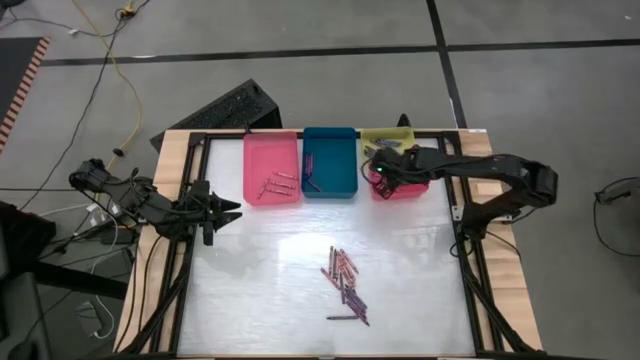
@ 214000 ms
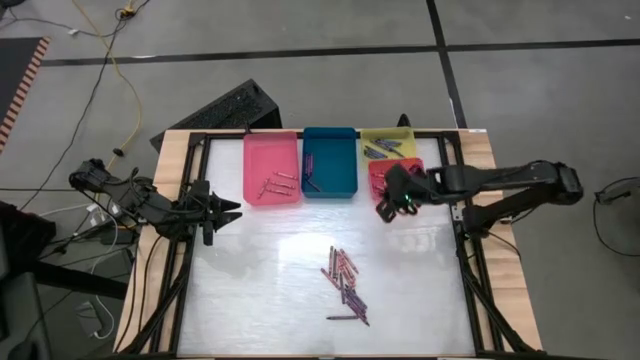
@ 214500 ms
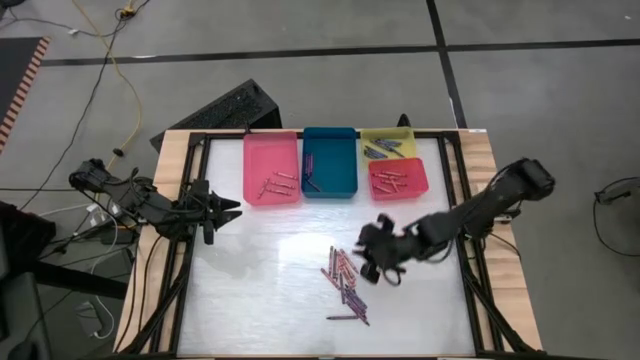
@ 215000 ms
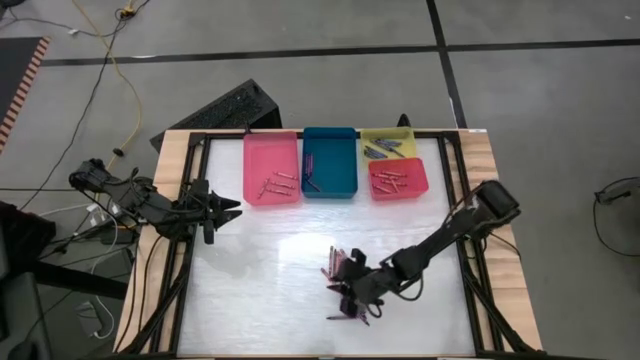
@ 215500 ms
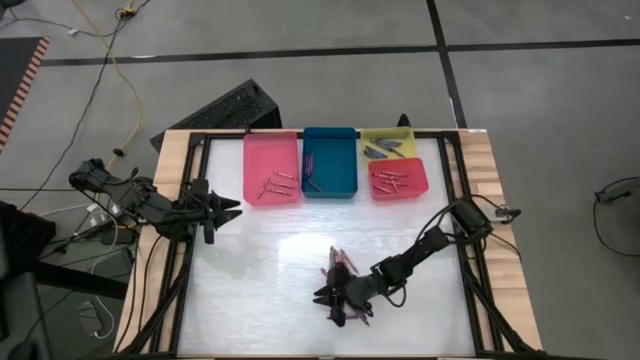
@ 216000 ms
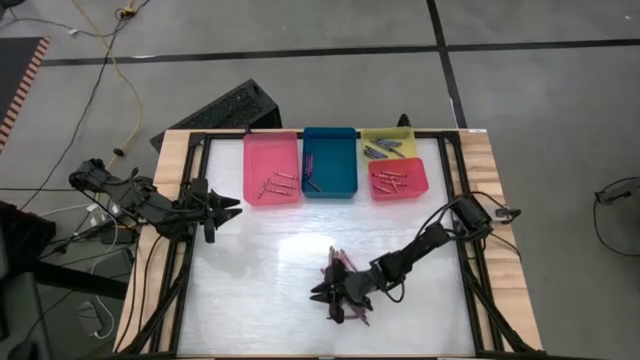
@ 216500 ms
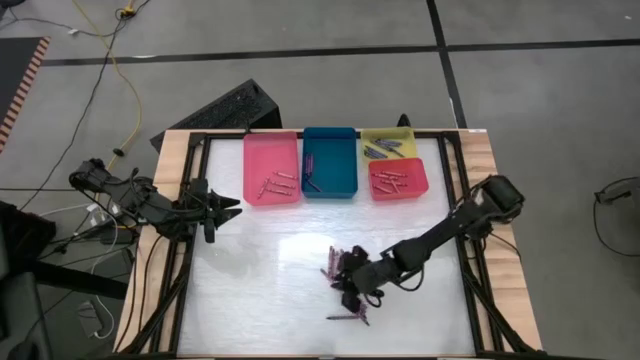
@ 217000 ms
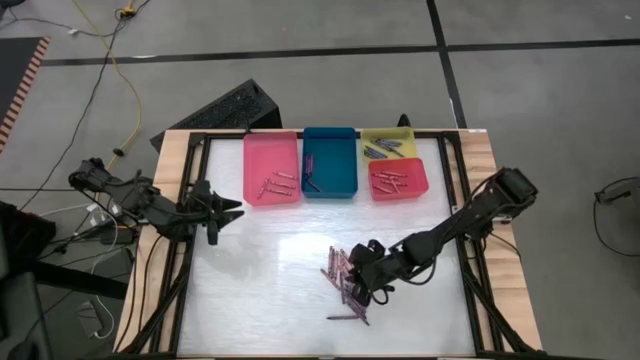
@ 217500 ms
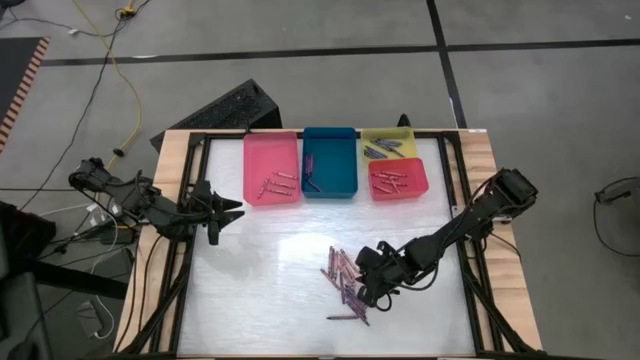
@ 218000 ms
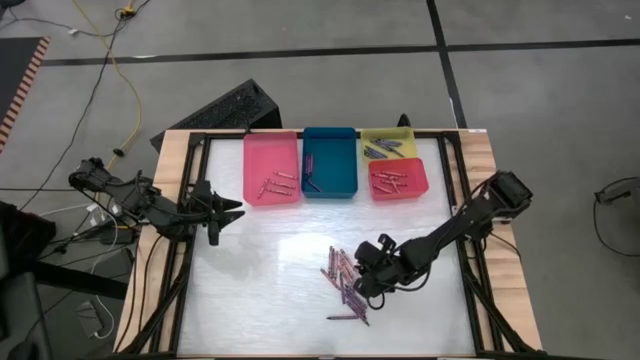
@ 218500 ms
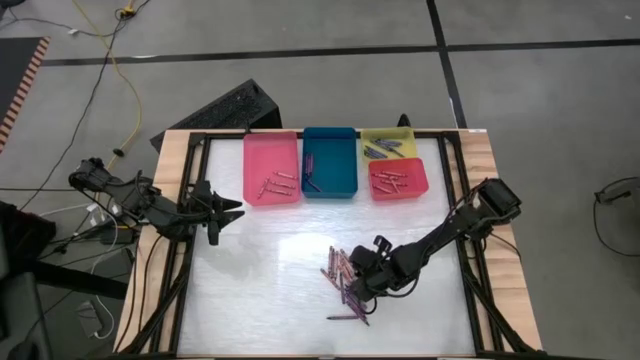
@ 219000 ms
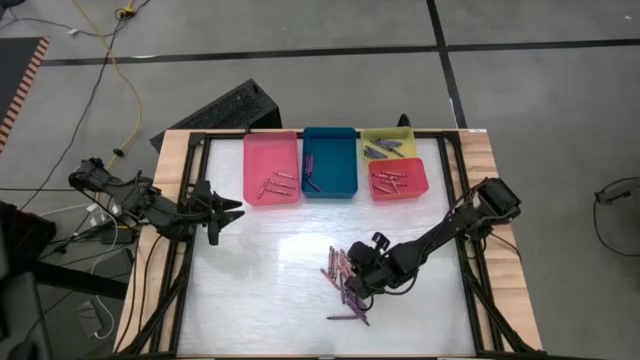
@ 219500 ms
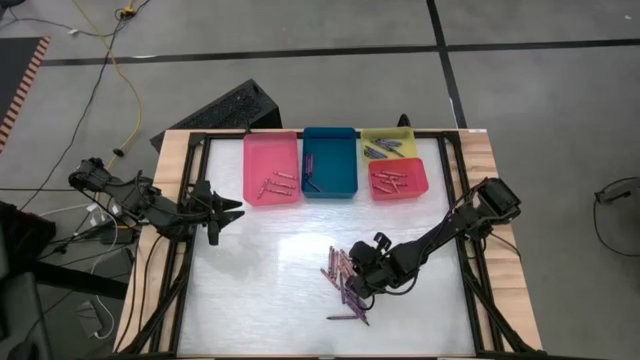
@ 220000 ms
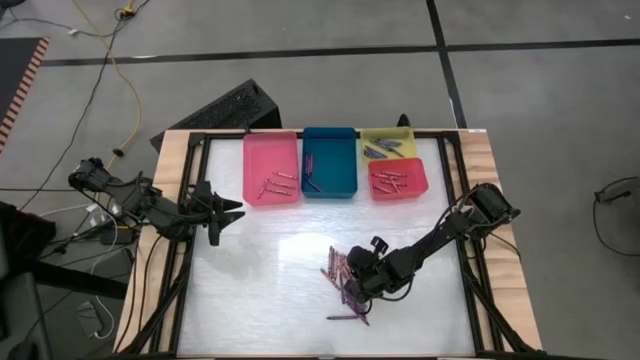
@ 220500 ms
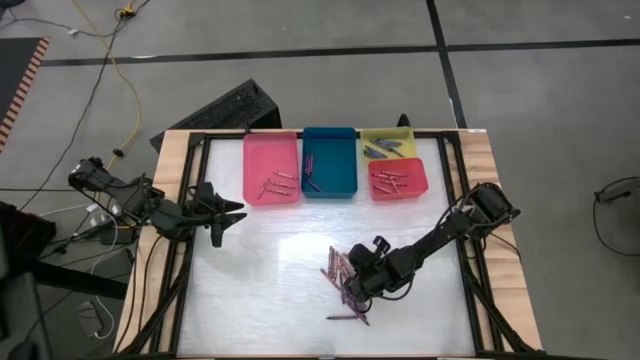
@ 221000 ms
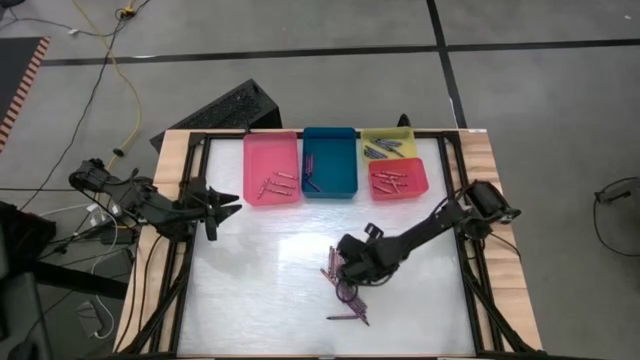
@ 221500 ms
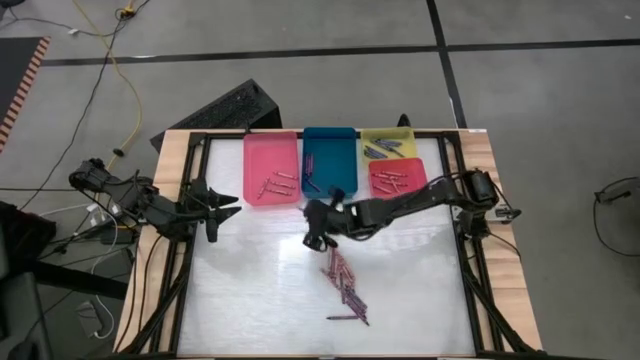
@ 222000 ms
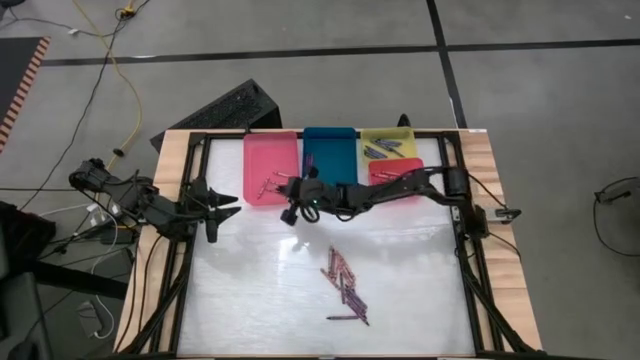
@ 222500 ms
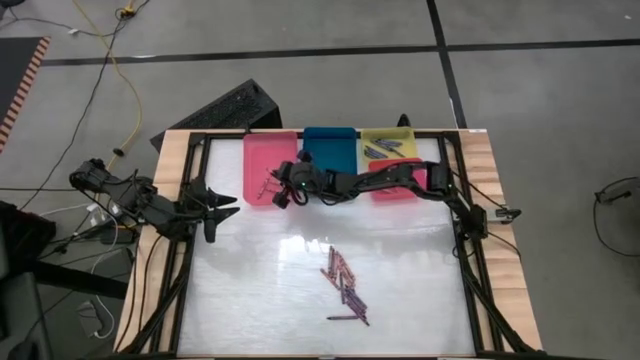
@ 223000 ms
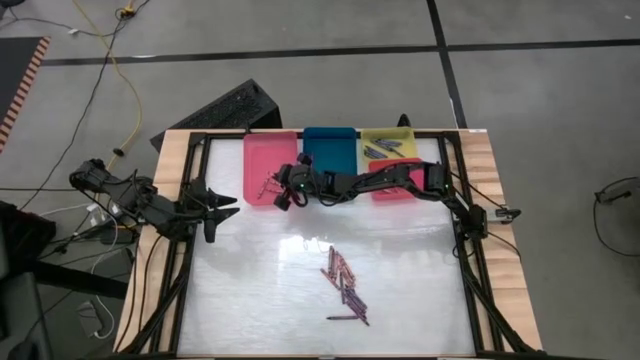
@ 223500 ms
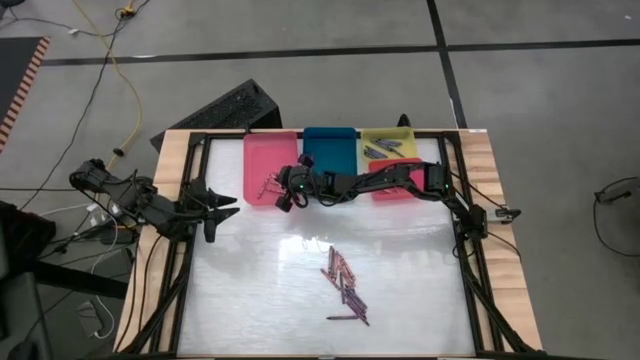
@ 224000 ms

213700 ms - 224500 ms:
Task: Sort crayons
Put the pink crayon into the pink bin

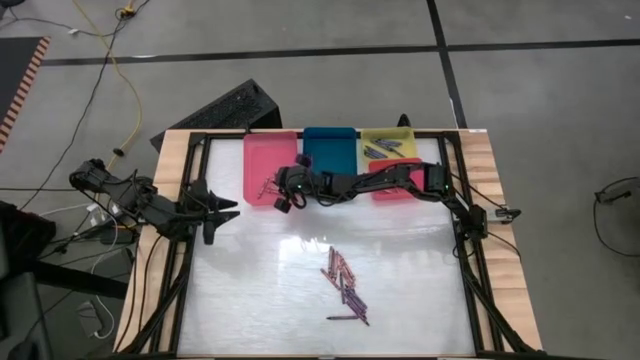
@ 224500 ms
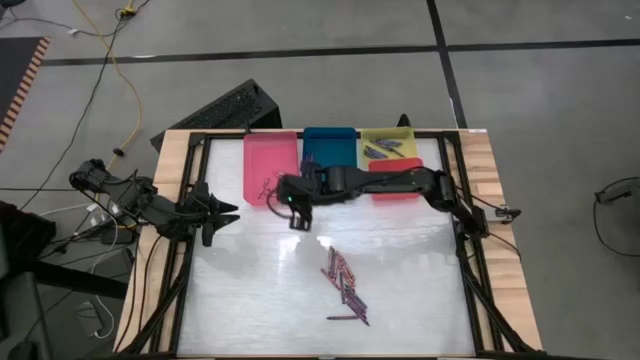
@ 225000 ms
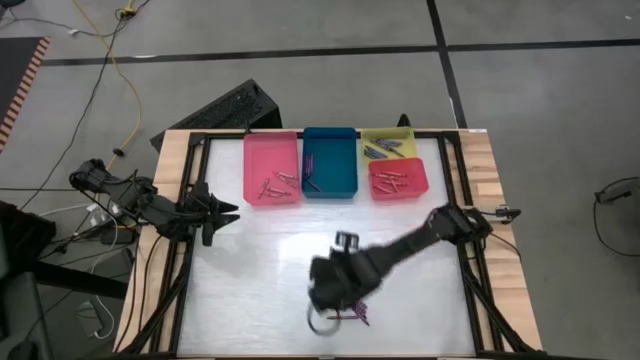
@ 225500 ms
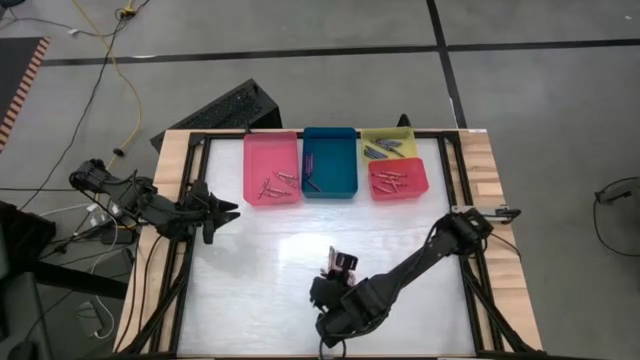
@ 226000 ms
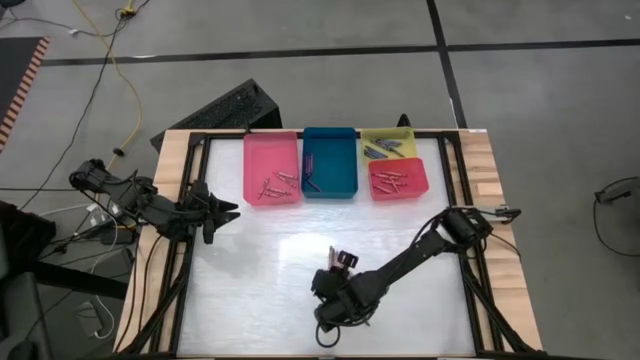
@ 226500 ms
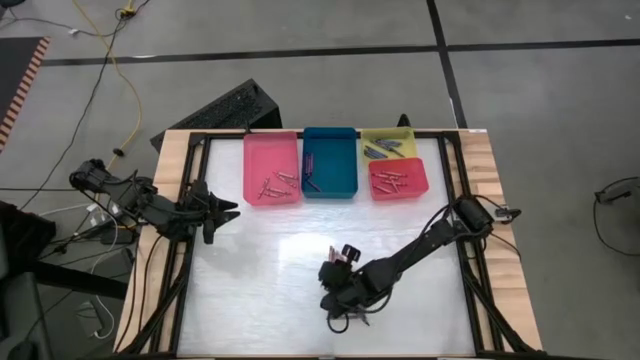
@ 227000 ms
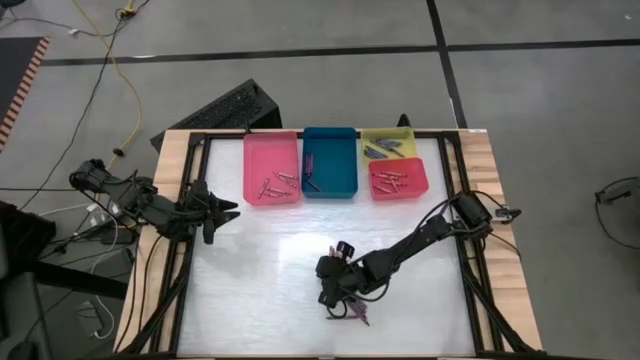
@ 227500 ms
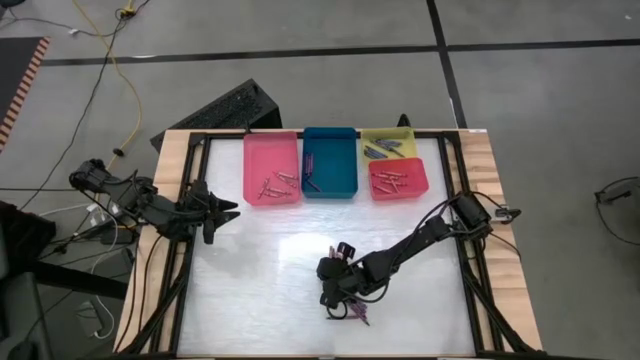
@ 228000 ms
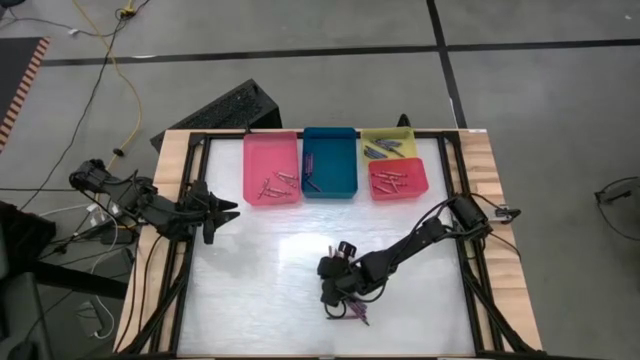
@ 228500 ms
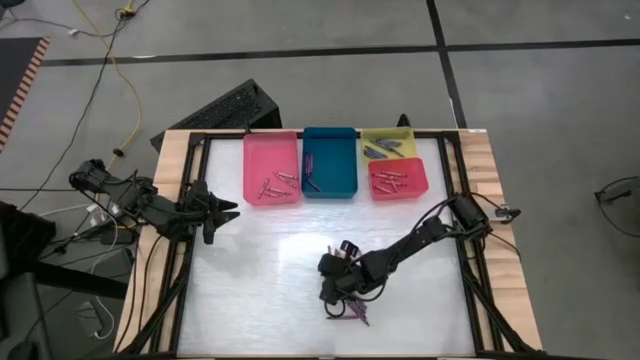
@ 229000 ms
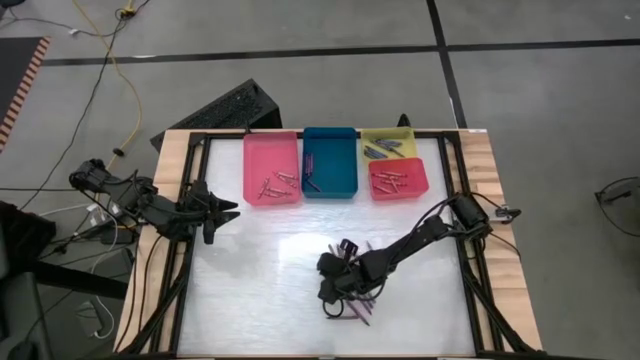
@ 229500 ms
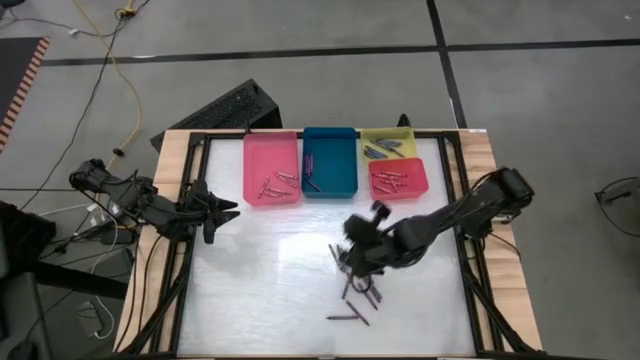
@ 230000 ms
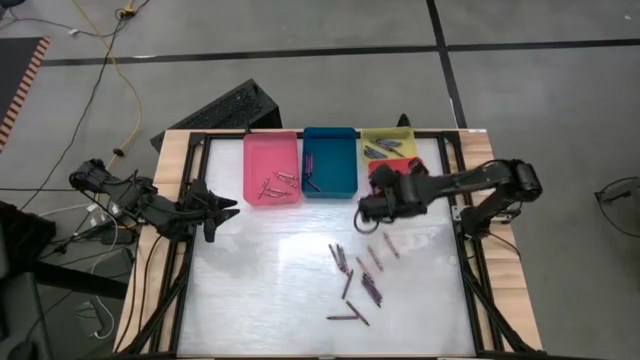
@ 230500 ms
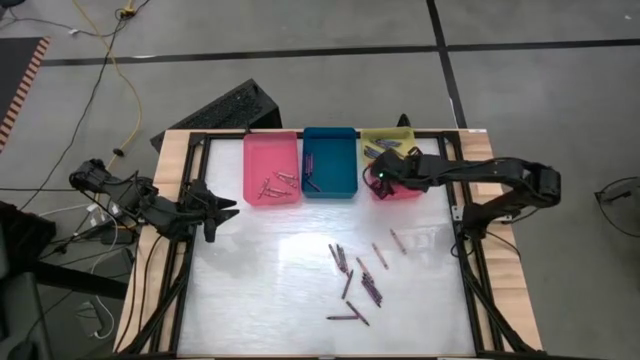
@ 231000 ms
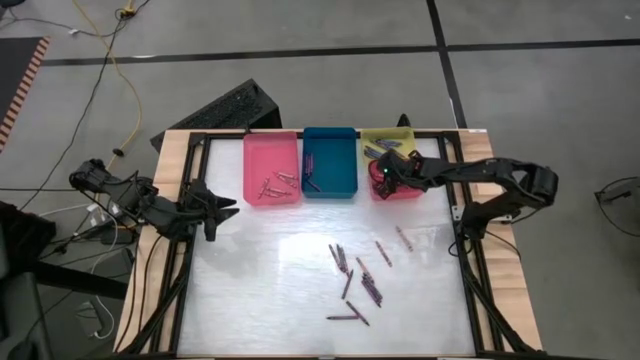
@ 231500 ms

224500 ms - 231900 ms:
Put the red crayon into the red bin

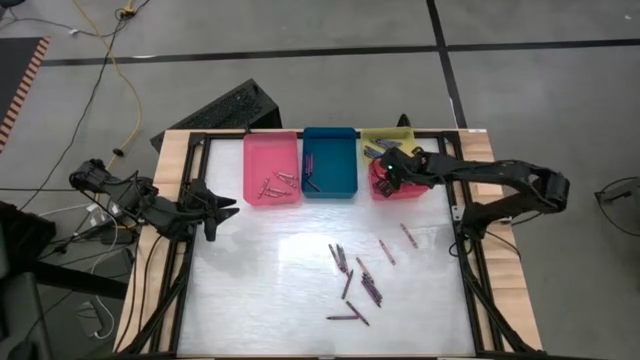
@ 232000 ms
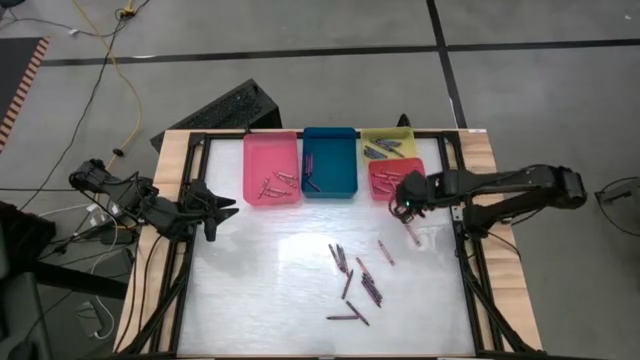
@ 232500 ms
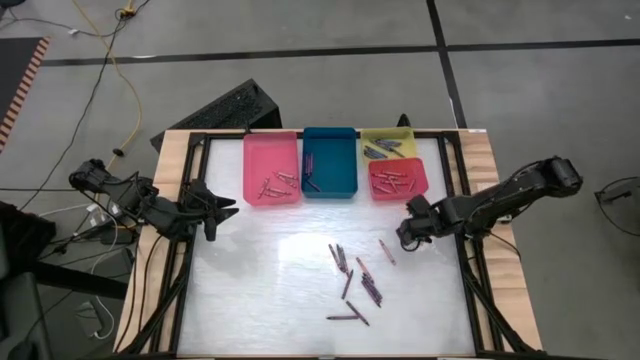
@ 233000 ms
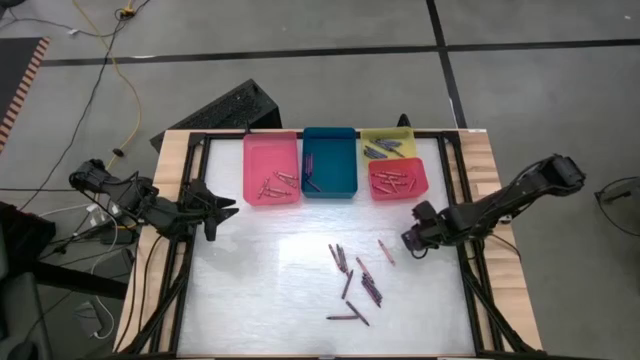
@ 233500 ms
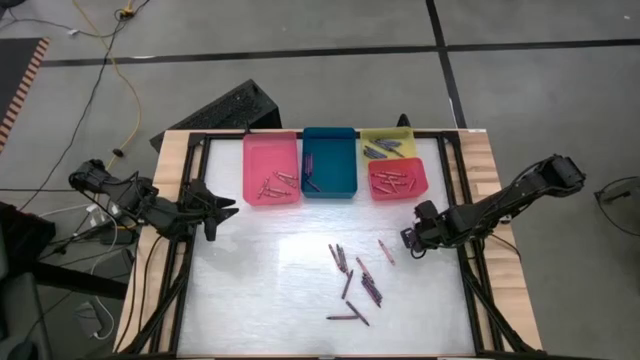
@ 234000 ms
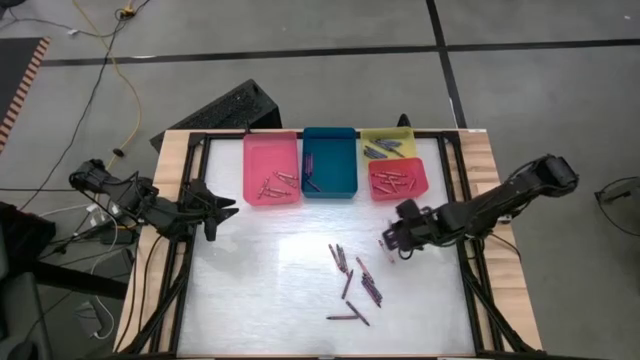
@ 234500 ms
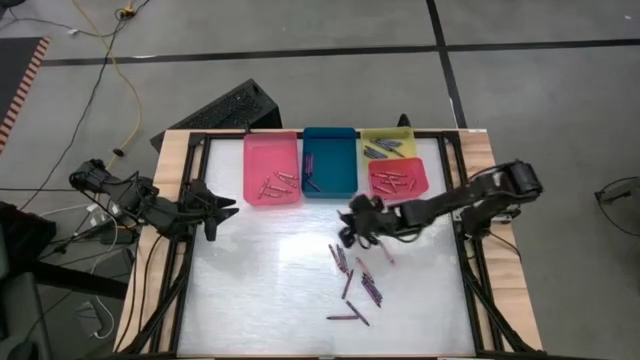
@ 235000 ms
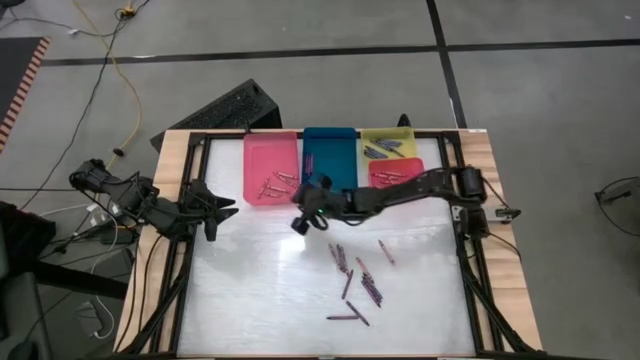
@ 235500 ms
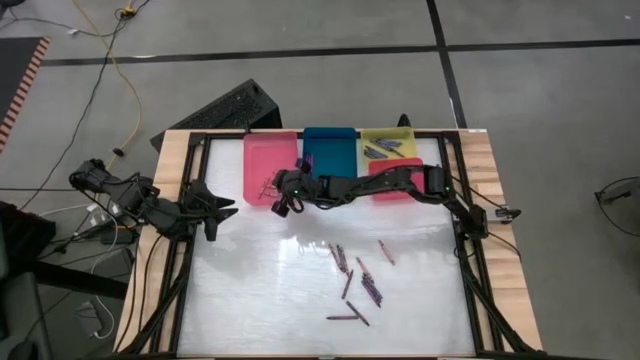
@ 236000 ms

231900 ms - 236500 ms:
Put the pink crayon into the pink bin
